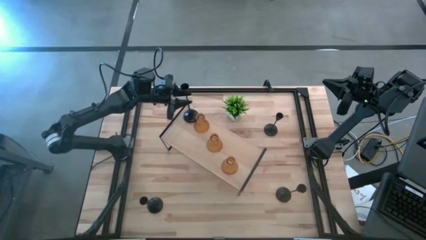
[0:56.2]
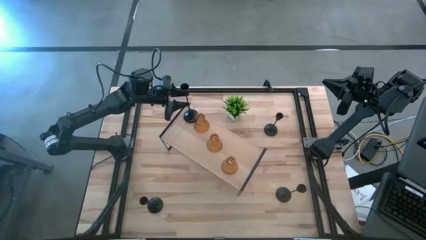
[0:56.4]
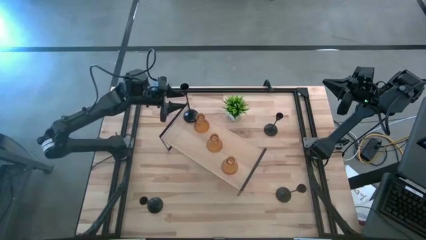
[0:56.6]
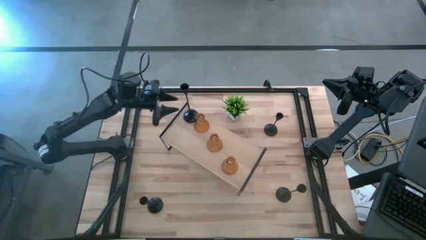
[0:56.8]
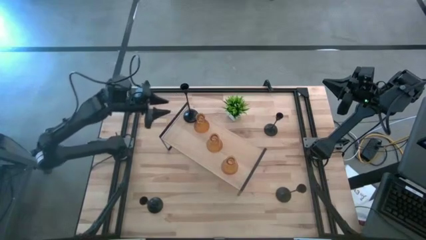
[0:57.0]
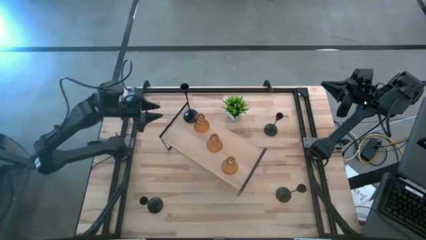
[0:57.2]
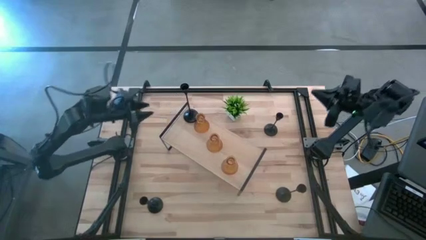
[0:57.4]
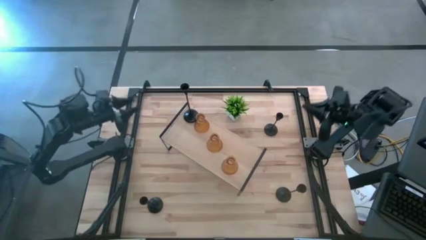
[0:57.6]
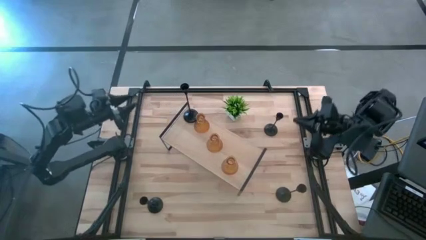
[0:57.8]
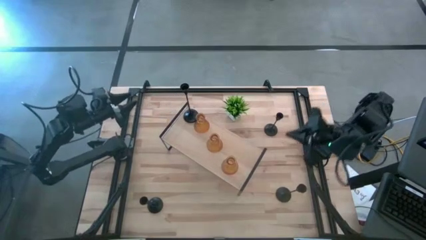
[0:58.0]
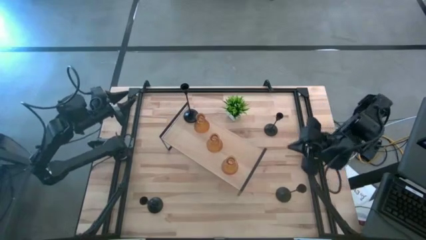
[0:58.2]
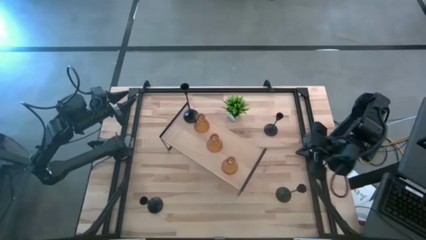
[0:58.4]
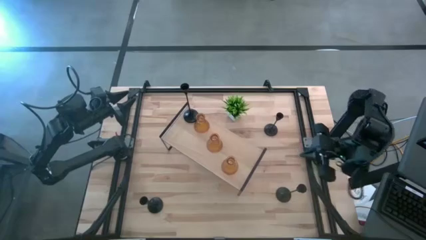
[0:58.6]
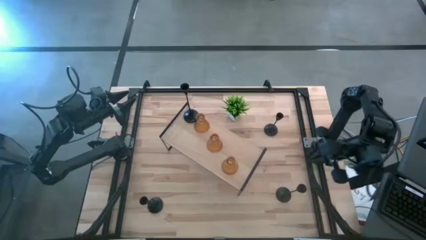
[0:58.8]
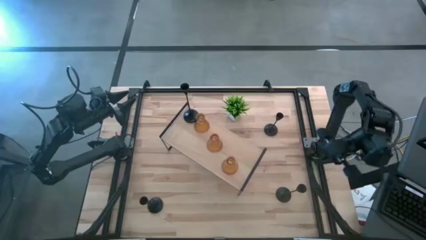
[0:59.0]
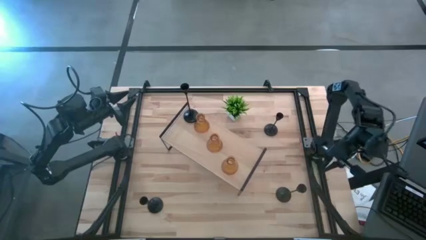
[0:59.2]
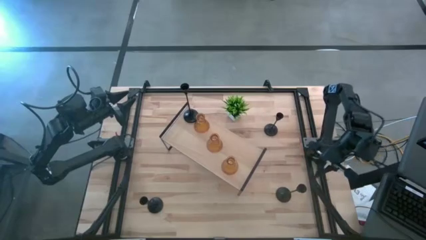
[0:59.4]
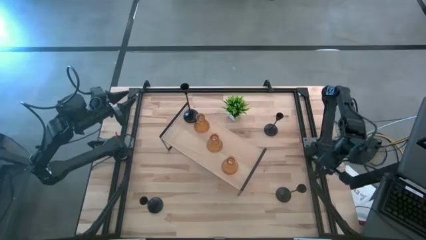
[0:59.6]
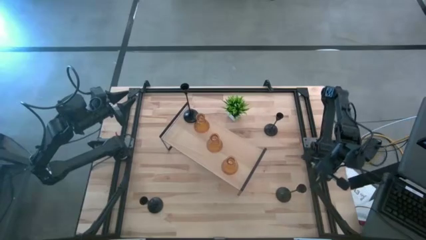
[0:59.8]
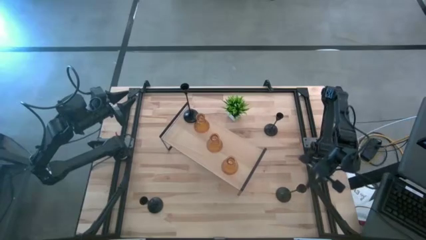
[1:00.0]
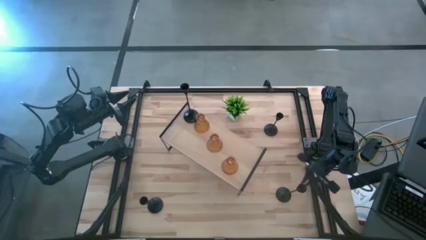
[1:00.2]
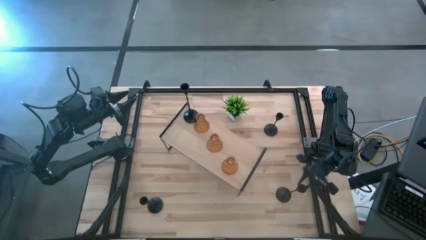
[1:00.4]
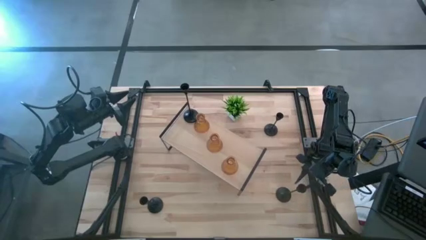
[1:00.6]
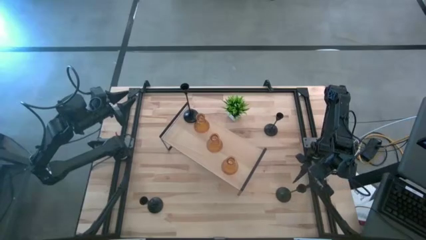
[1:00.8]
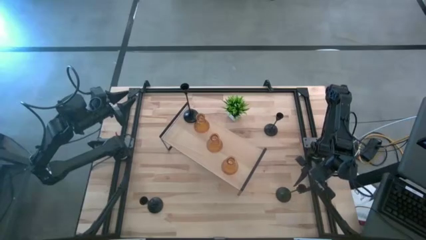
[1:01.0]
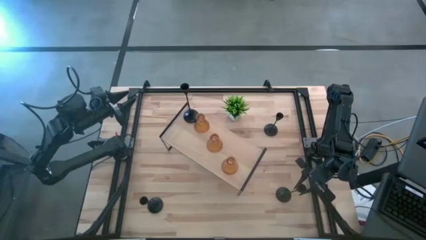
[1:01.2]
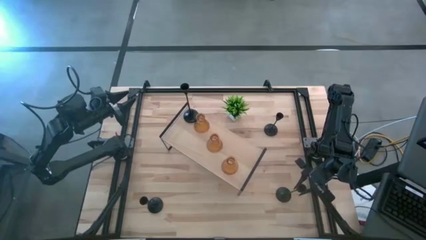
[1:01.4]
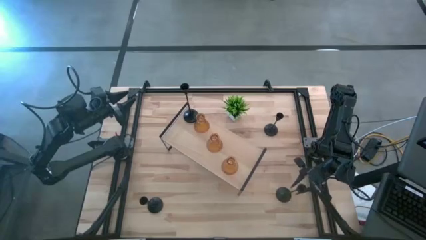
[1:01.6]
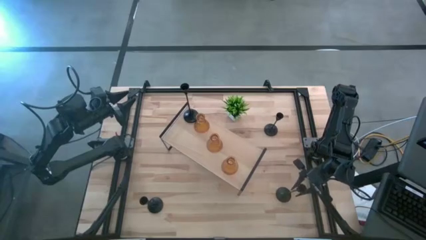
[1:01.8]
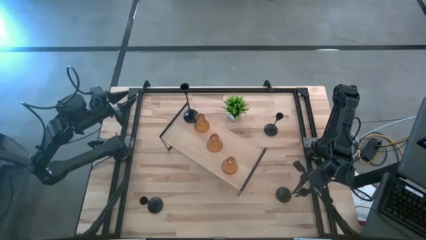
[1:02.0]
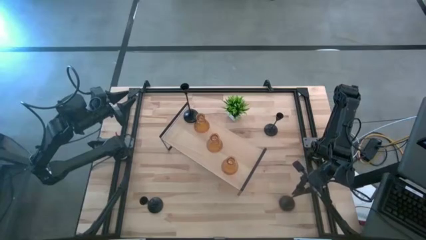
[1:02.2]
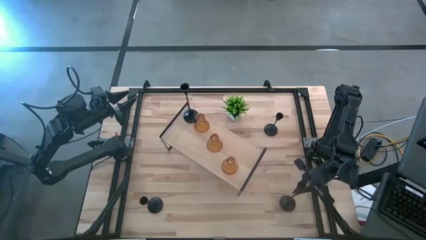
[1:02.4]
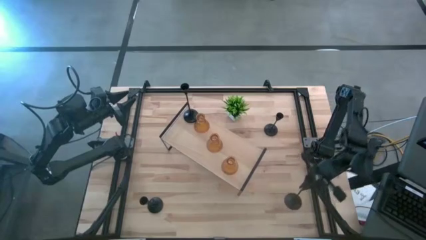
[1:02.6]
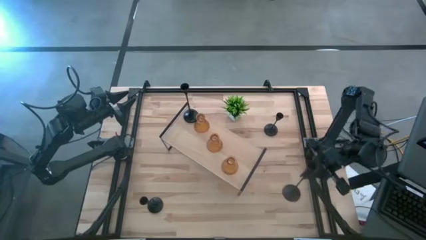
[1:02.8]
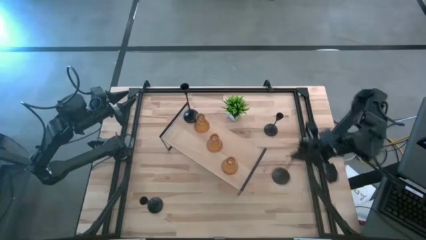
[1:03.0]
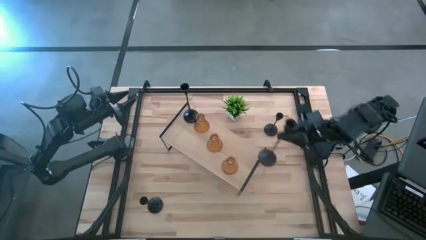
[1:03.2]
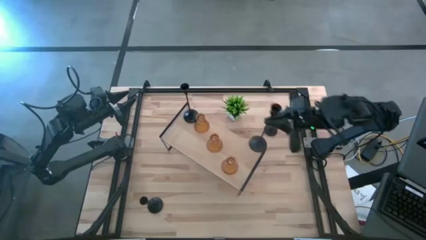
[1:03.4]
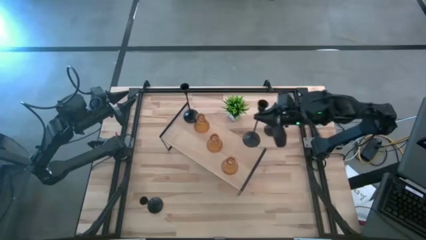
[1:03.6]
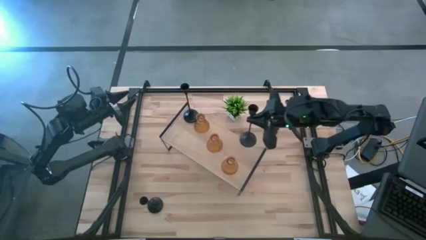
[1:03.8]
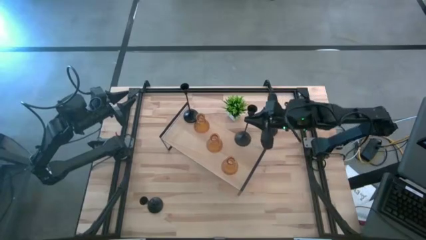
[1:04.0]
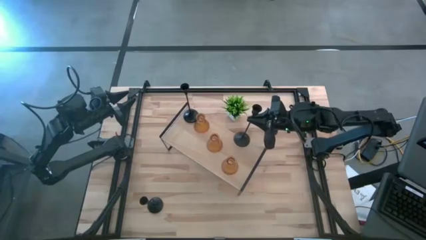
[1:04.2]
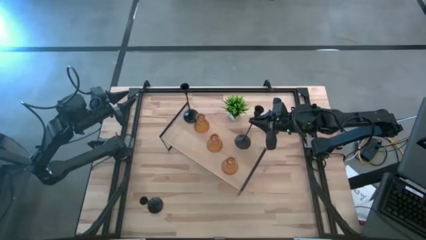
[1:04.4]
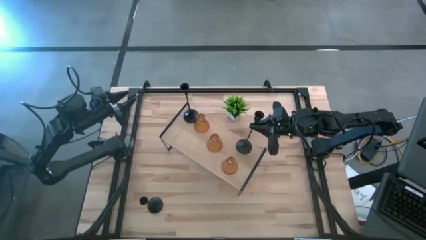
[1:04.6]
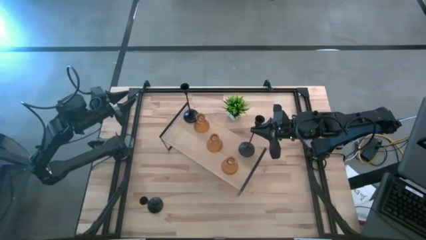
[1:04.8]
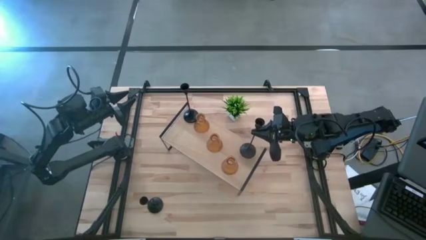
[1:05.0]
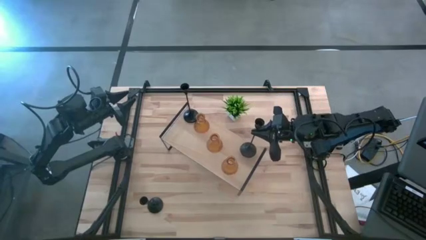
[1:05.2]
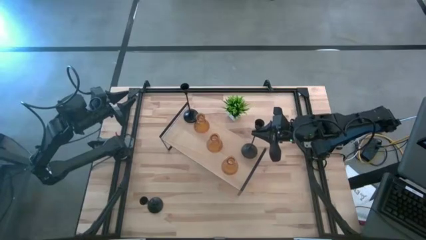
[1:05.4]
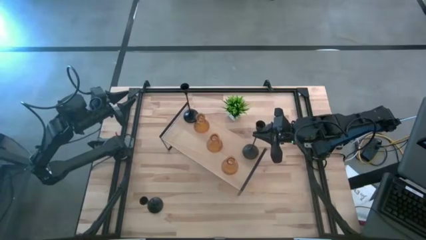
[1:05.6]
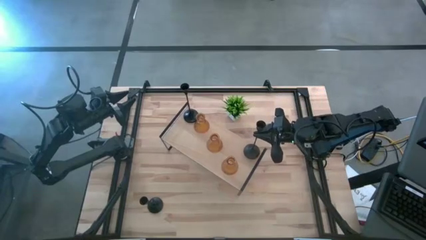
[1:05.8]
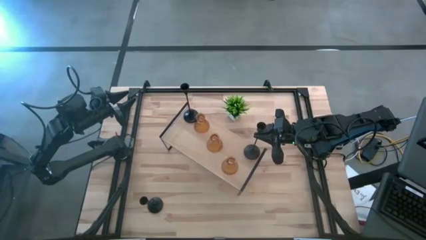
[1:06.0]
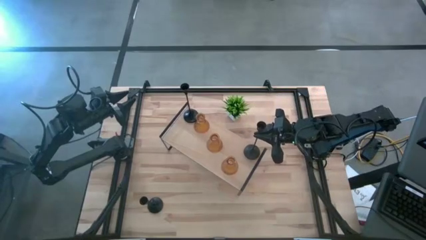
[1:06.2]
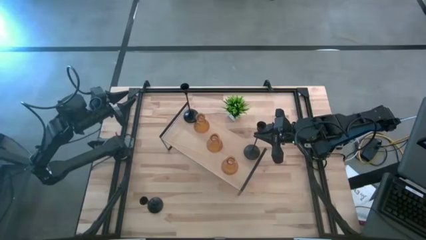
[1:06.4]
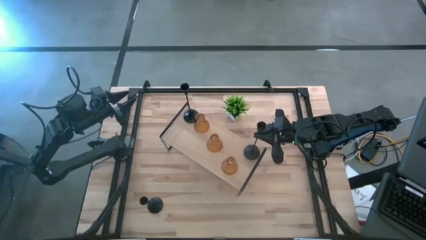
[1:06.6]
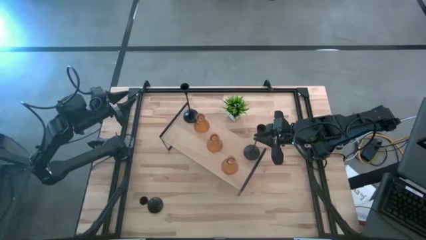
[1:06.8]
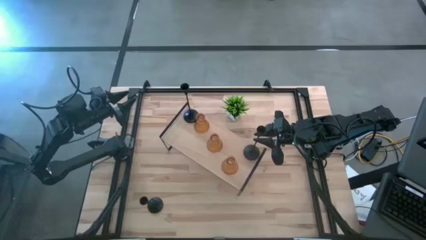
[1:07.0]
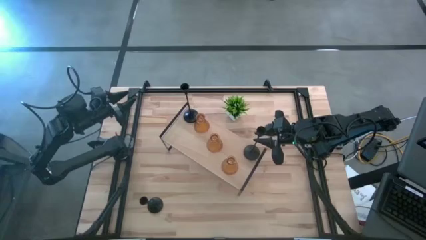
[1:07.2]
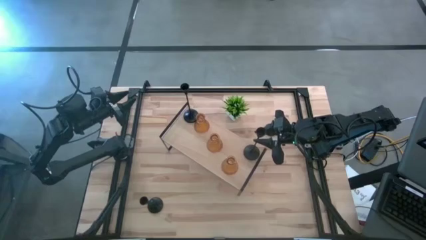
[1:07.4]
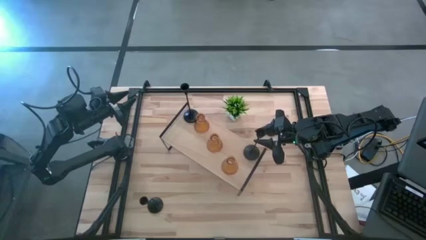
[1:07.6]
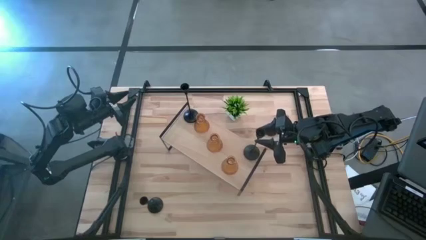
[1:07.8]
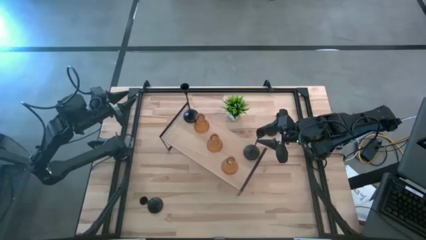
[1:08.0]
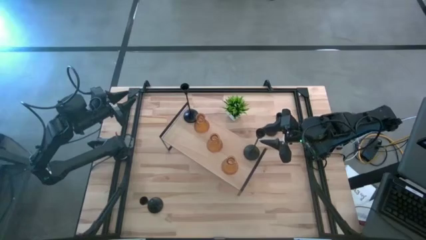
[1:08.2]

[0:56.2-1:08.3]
Task: Pick & Place candle stick holders
Put the black candle holder on the shelf
